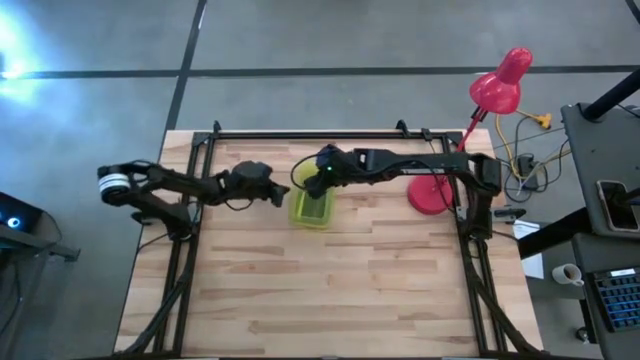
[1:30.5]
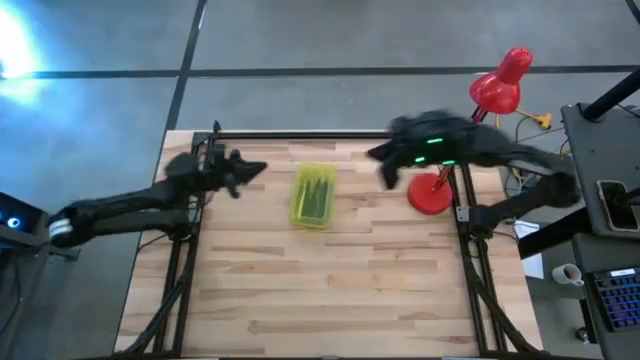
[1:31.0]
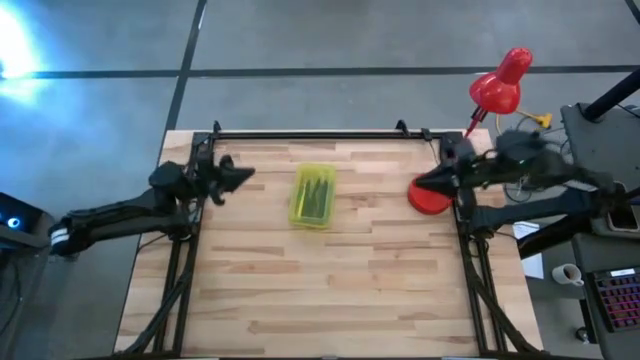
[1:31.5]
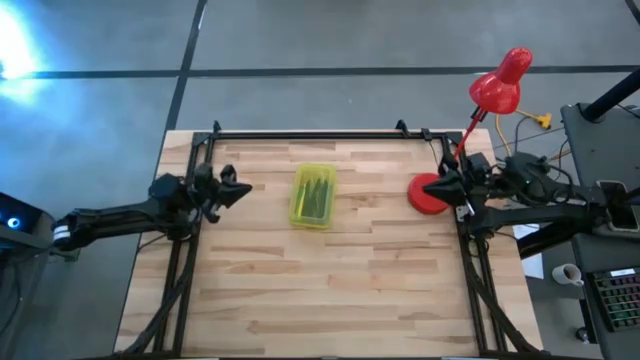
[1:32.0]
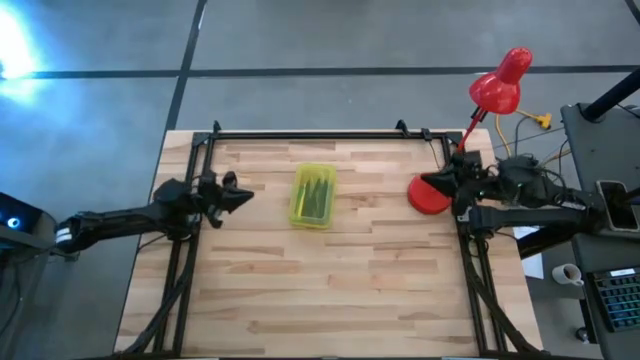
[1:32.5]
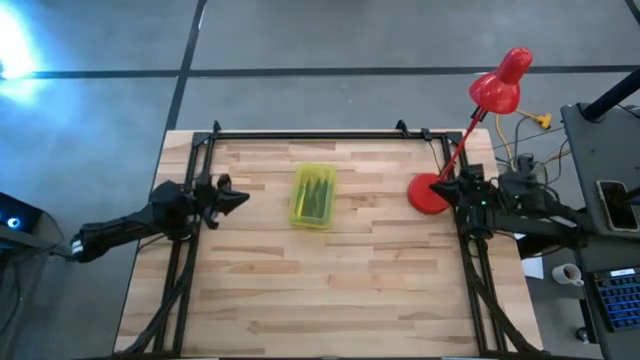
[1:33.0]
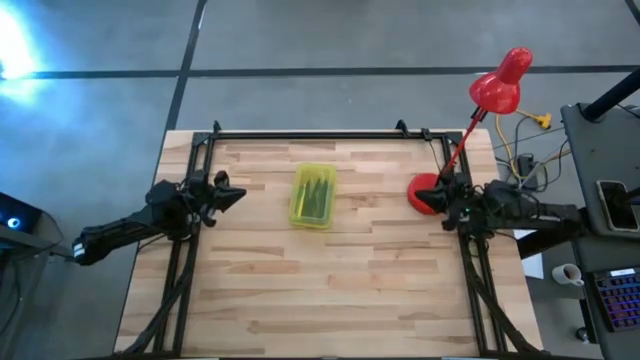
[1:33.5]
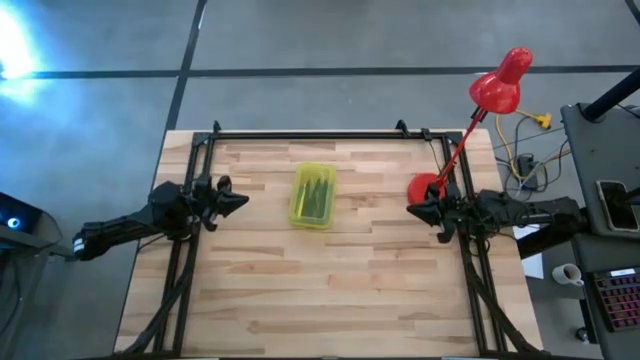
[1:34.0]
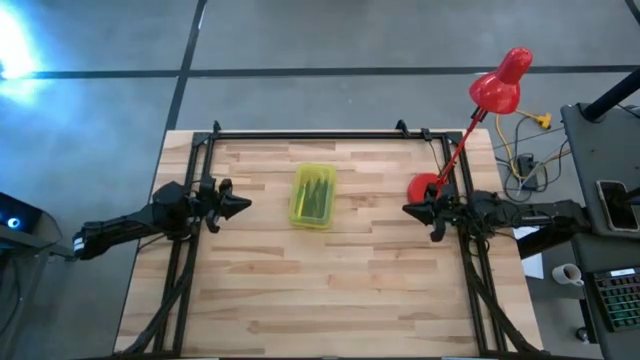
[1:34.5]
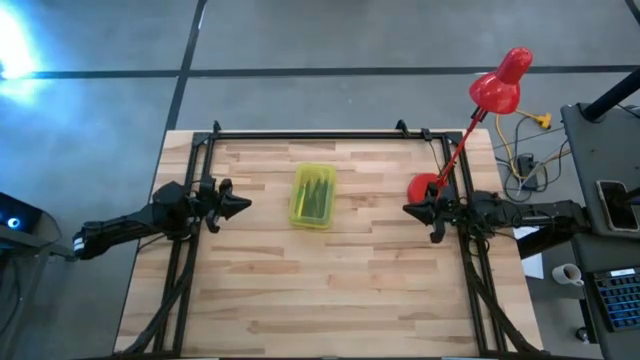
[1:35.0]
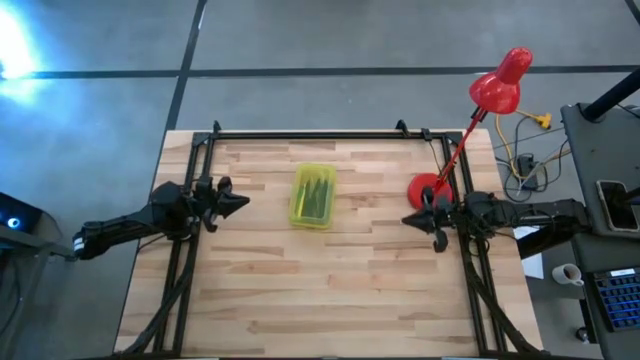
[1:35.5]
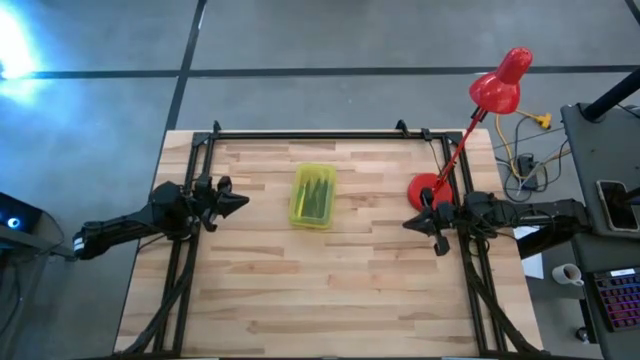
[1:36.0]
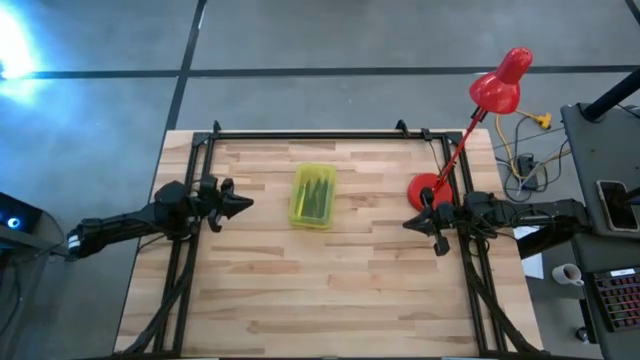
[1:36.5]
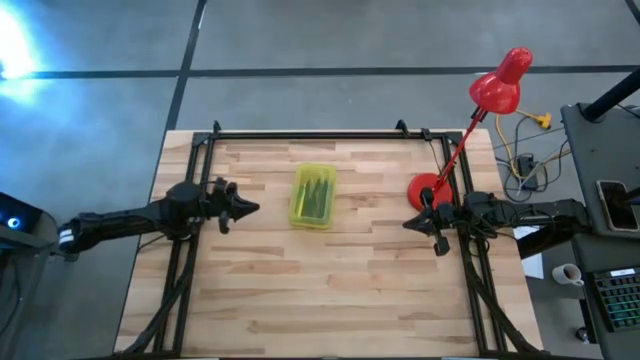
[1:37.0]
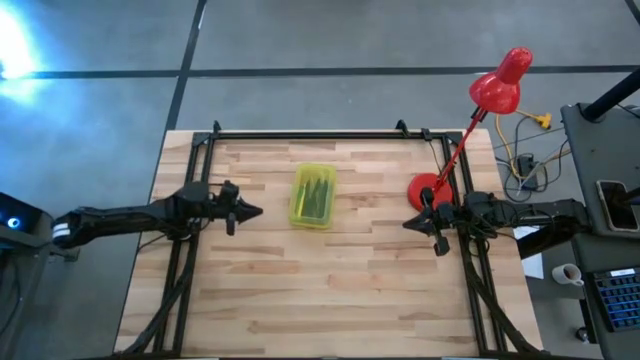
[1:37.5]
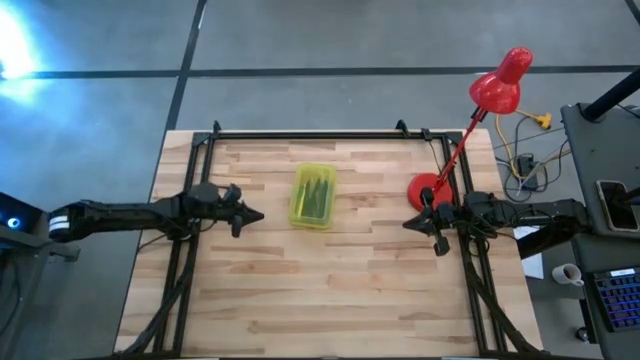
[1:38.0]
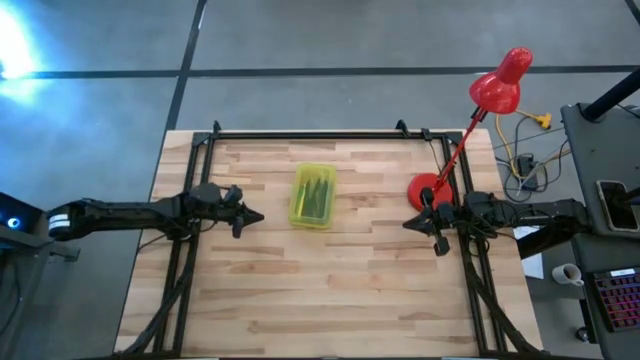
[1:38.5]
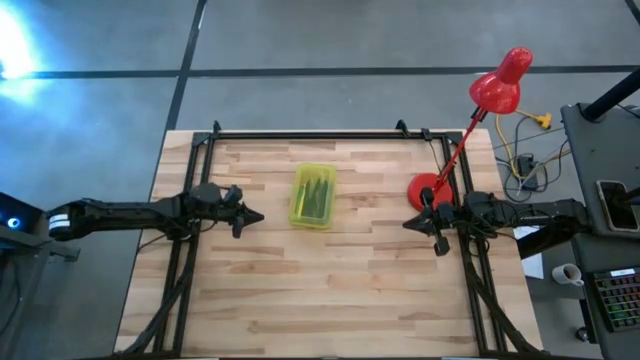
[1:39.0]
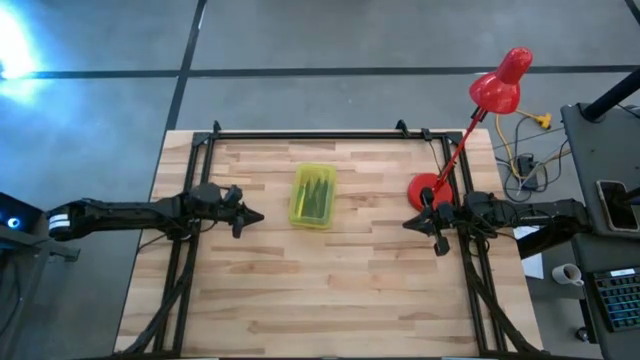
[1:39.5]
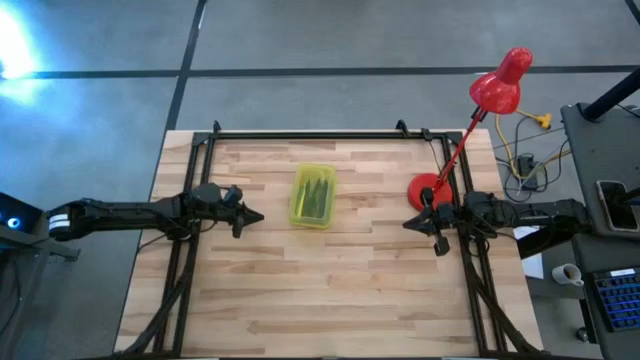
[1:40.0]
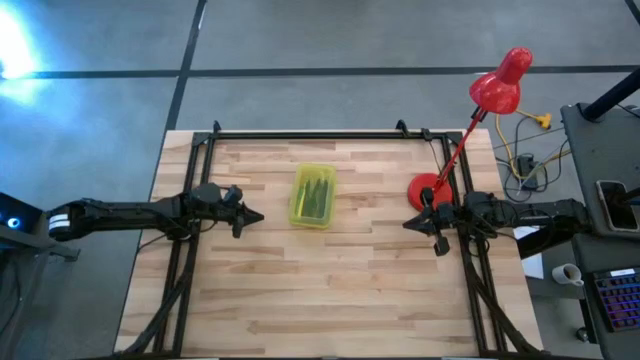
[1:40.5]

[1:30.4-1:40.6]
Task: Pick & place school supplies into a supply box
Return to Home Position

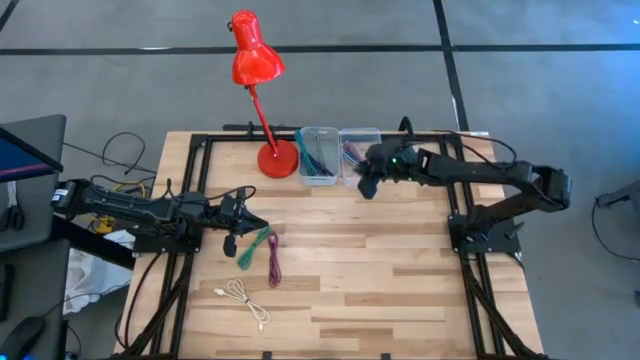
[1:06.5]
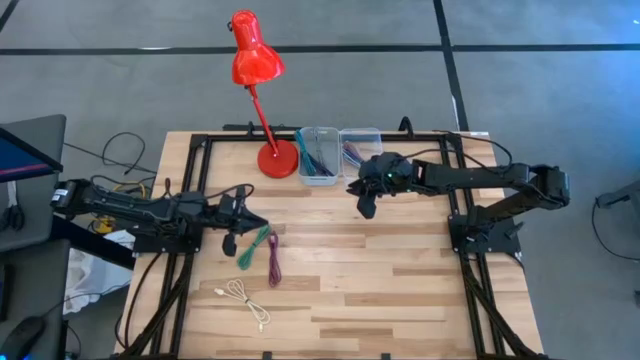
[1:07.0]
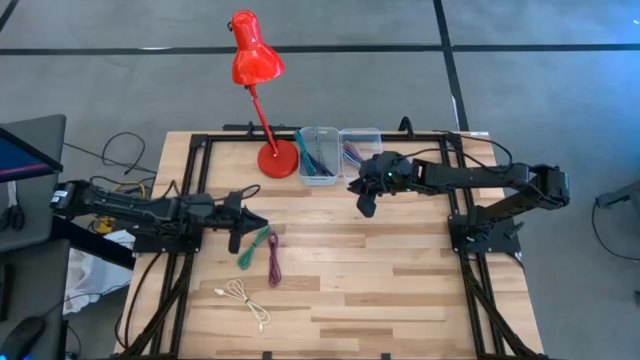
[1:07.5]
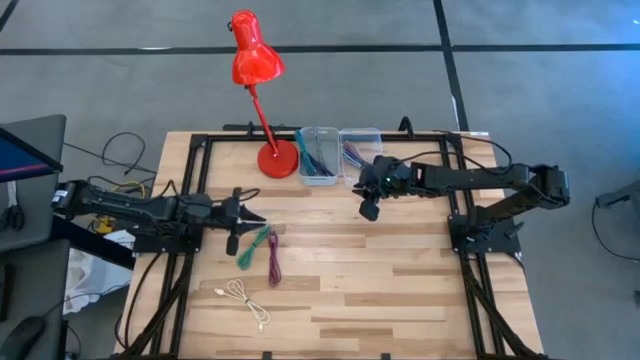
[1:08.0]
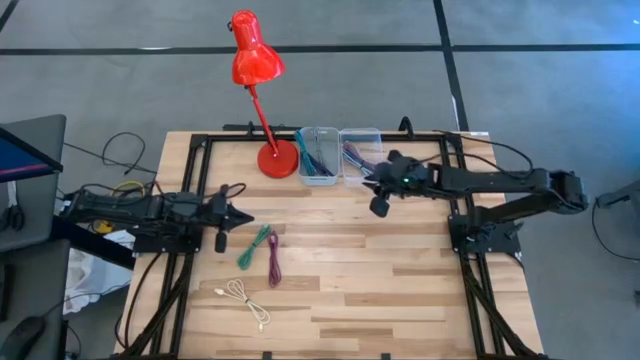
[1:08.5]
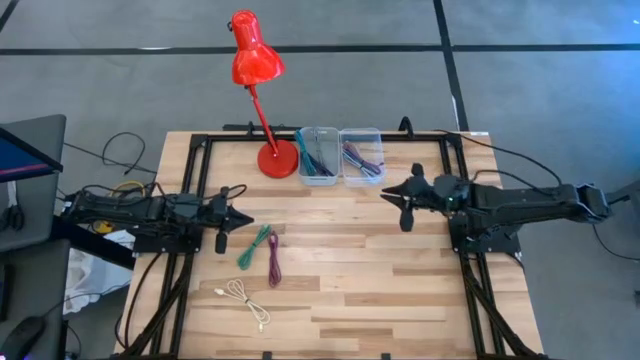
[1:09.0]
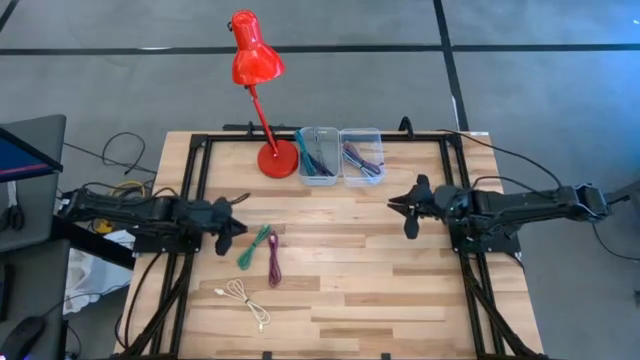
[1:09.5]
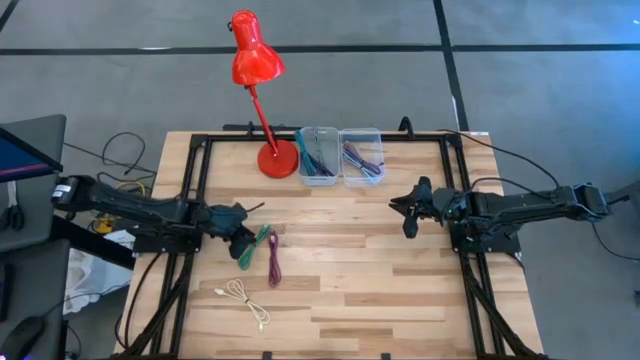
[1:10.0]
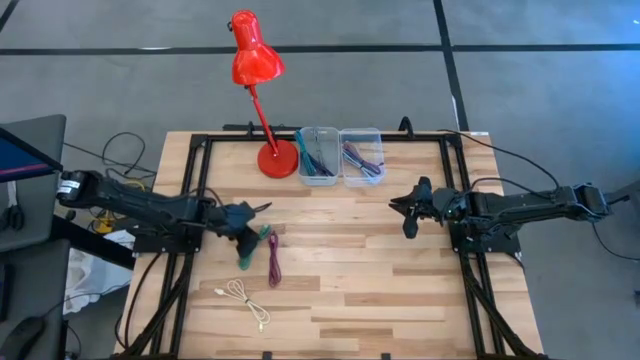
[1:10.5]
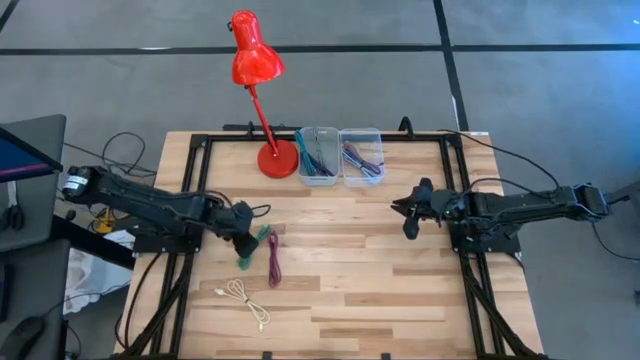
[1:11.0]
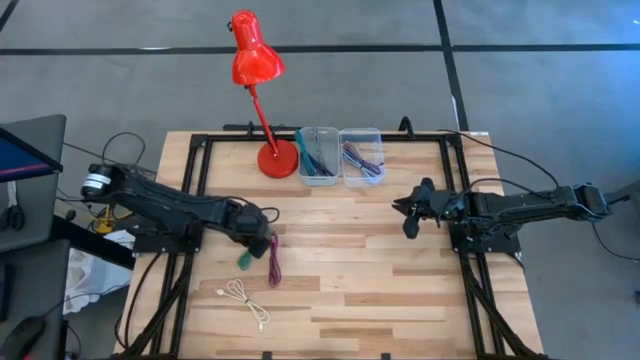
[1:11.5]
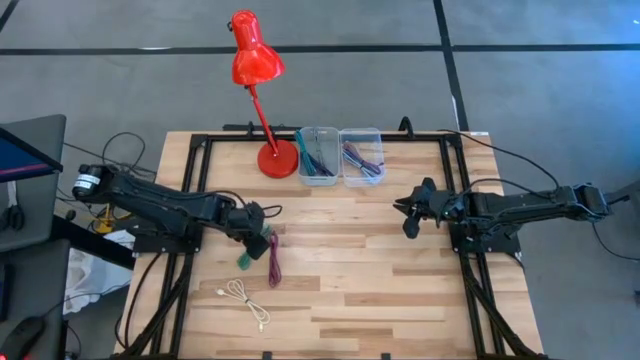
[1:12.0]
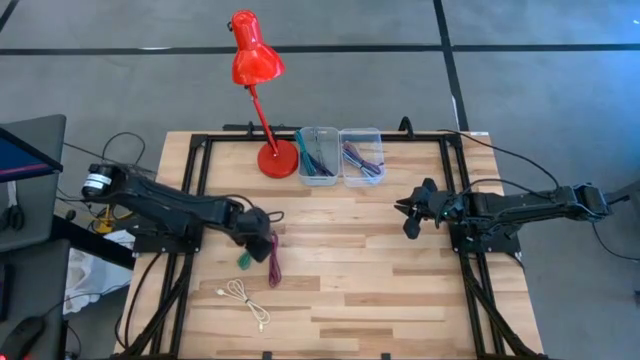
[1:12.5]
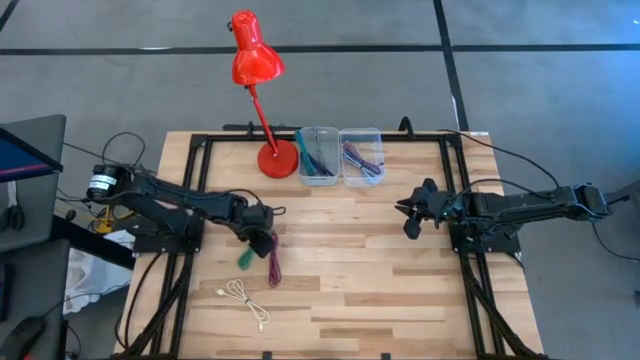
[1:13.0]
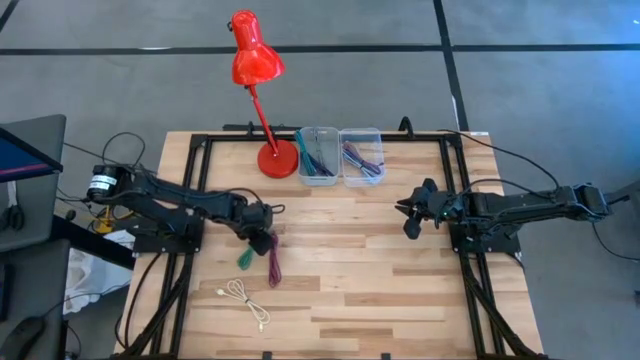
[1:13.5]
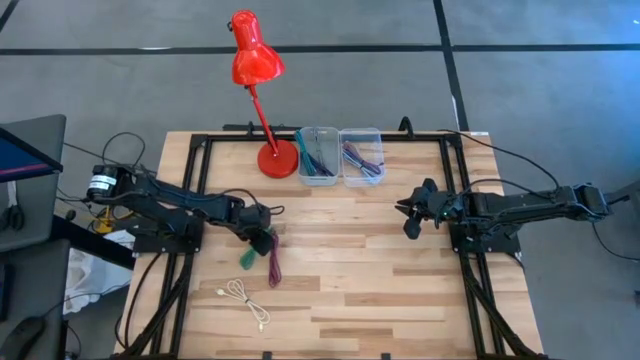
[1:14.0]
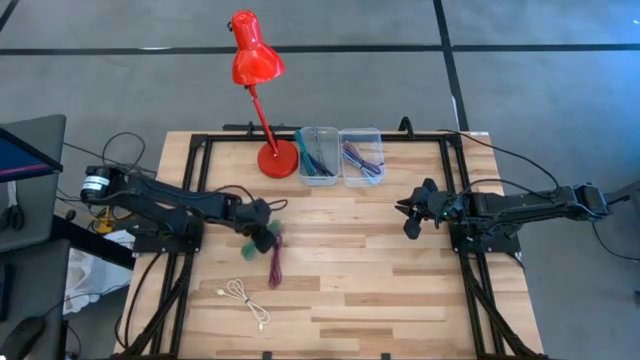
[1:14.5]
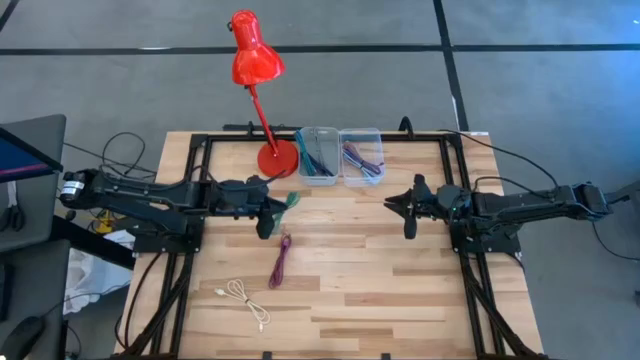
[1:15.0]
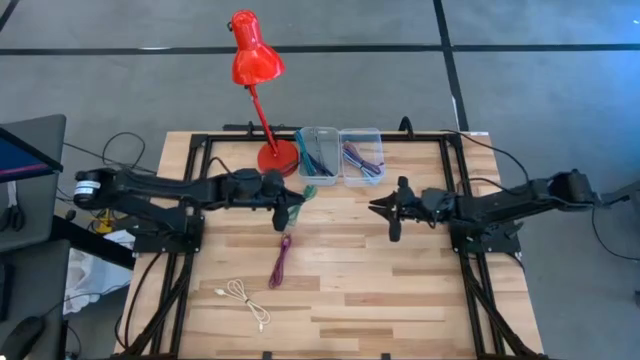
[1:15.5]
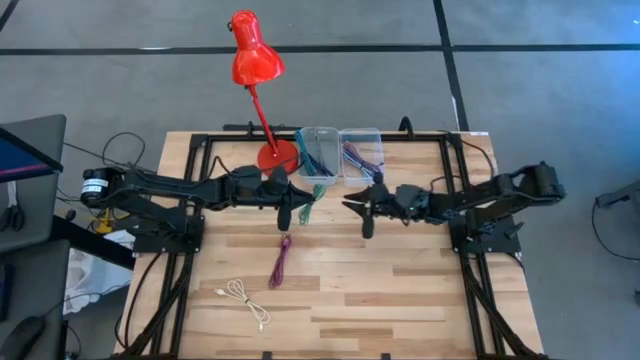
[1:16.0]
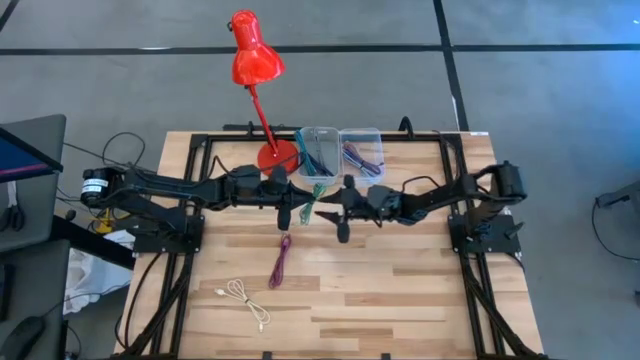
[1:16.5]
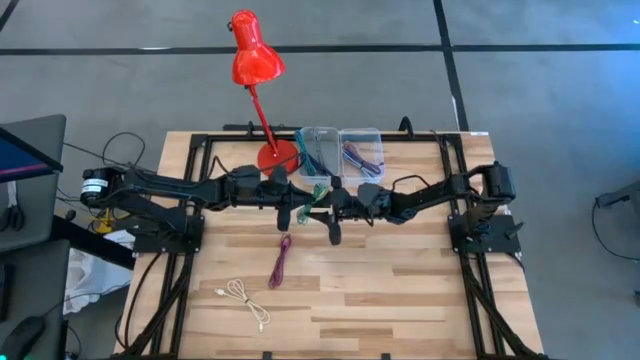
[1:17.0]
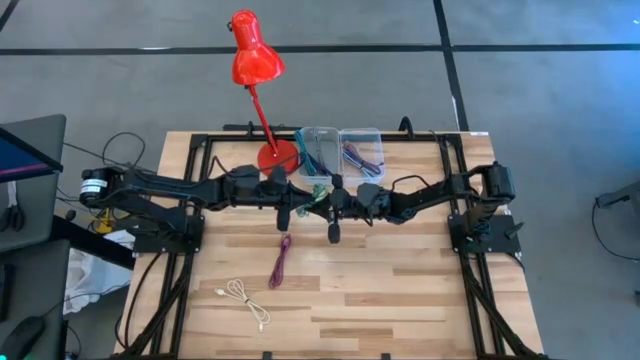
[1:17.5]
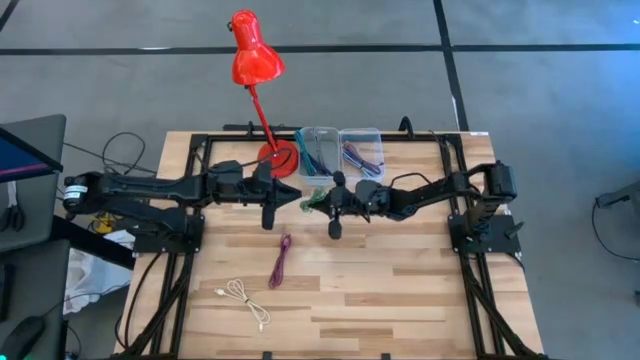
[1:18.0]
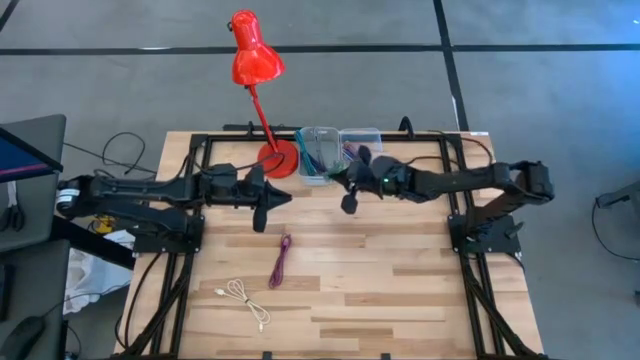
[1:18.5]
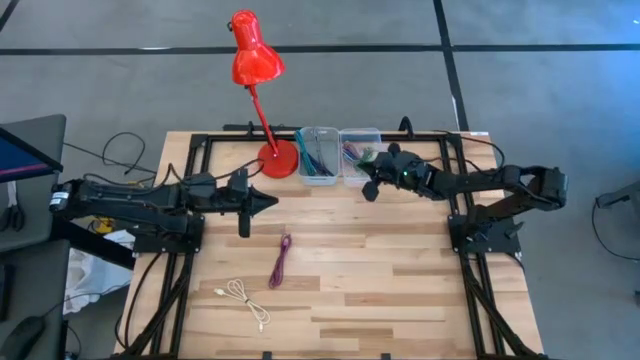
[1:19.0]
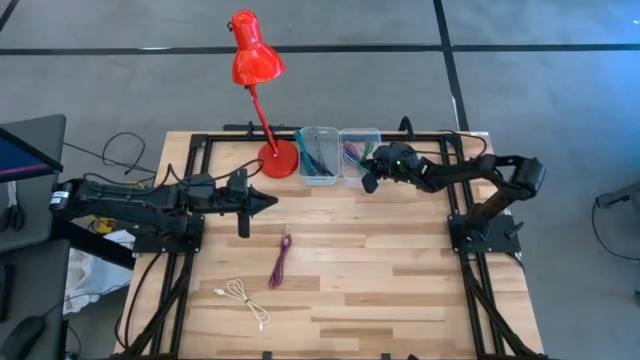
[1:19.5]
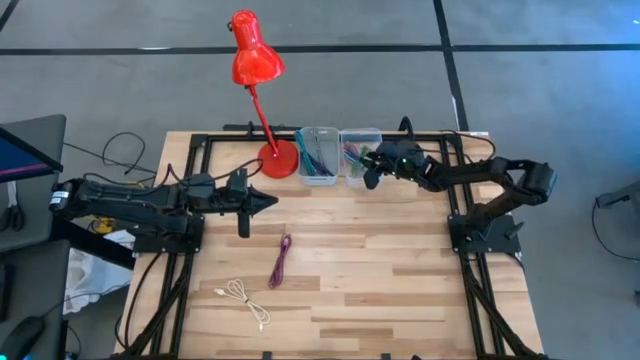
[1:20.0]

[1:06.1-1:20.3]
Task: Pick & Place USB Port
Put the green charger cable into the transparent bin
